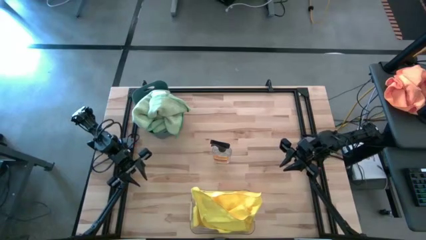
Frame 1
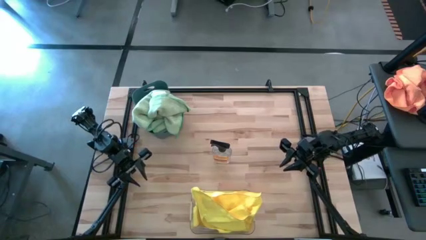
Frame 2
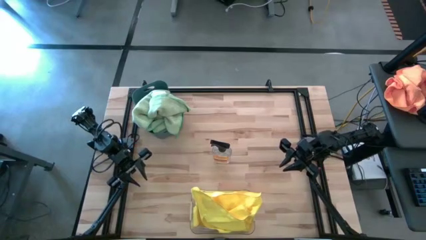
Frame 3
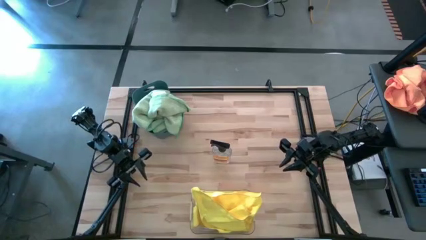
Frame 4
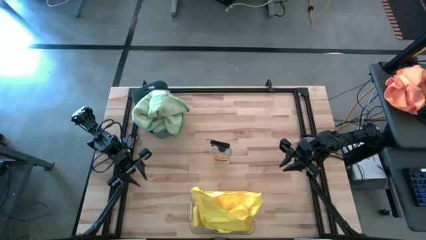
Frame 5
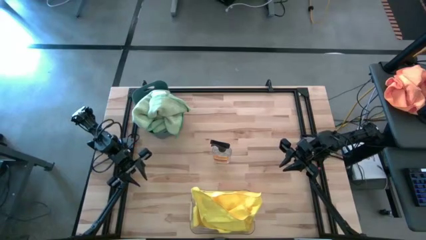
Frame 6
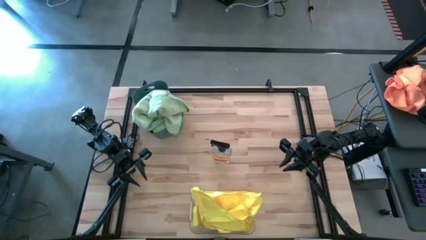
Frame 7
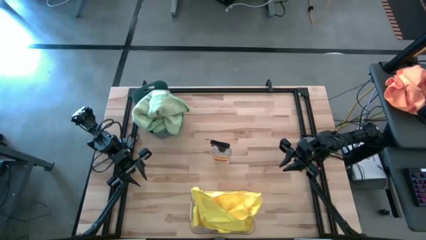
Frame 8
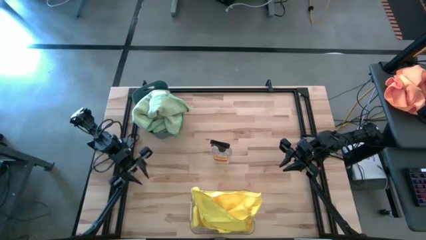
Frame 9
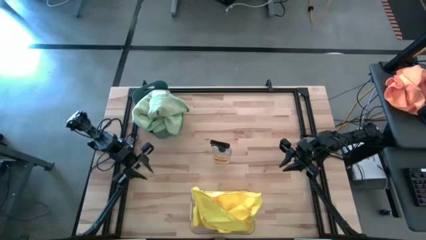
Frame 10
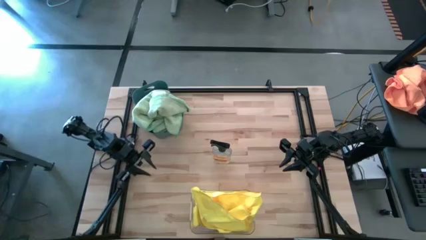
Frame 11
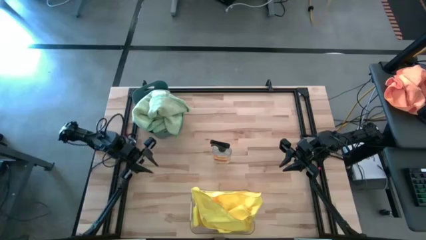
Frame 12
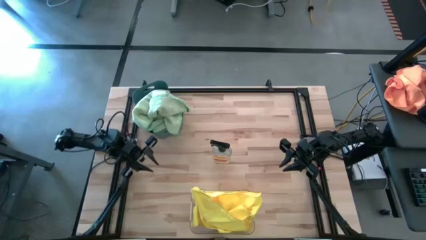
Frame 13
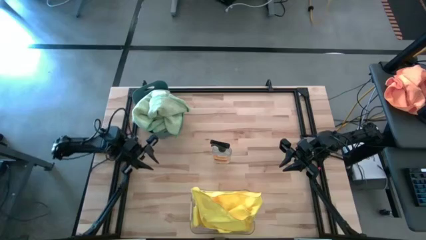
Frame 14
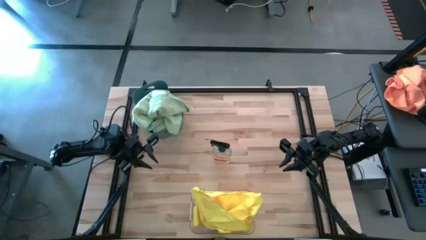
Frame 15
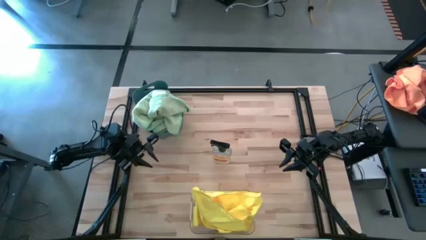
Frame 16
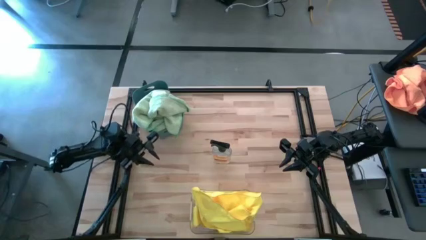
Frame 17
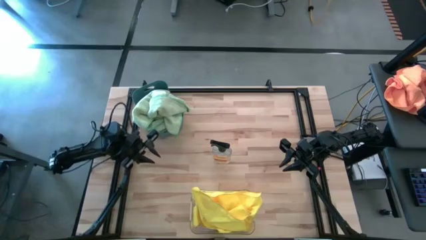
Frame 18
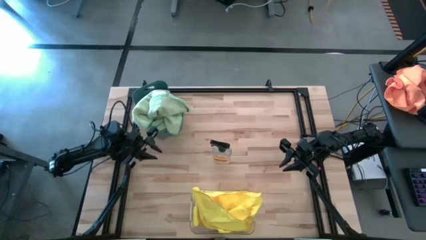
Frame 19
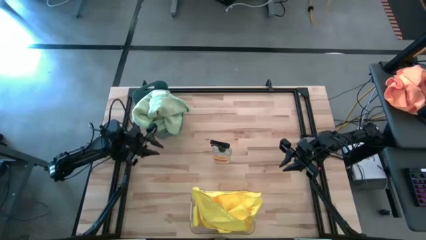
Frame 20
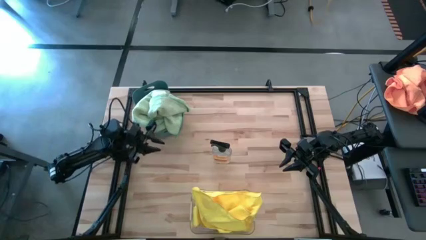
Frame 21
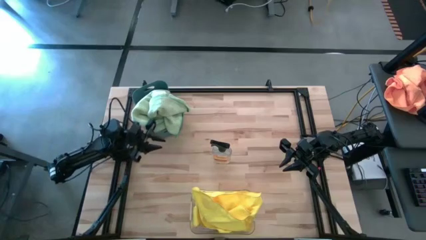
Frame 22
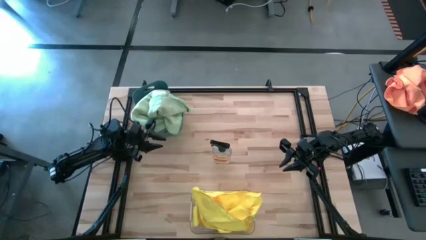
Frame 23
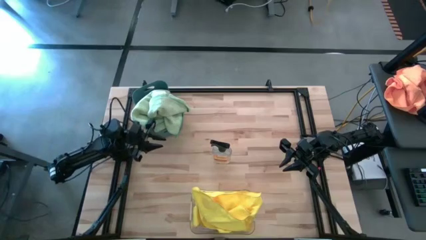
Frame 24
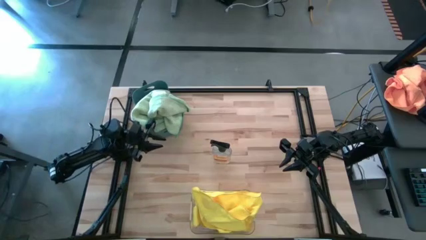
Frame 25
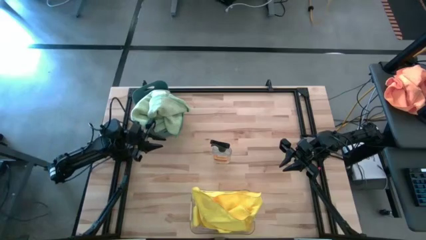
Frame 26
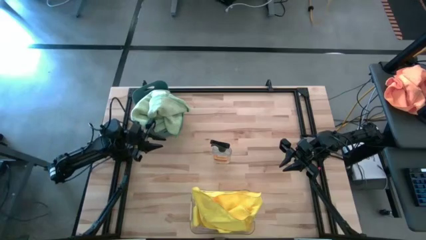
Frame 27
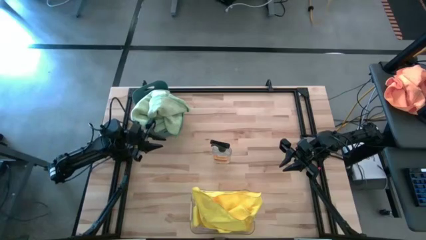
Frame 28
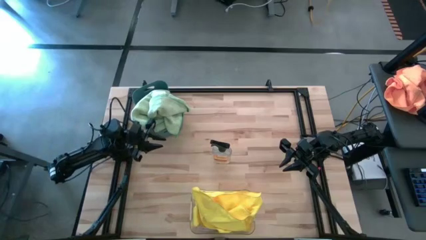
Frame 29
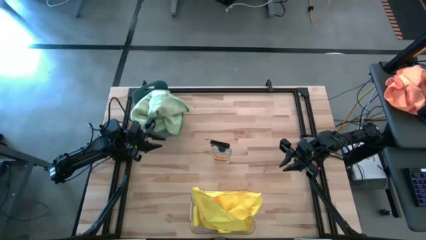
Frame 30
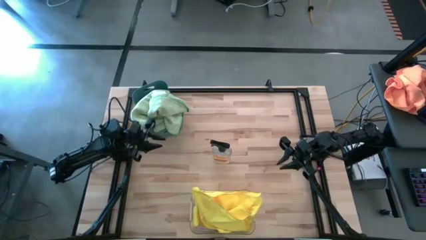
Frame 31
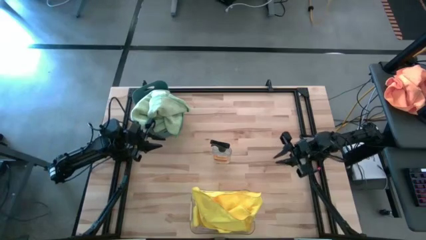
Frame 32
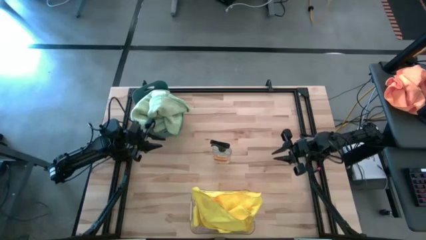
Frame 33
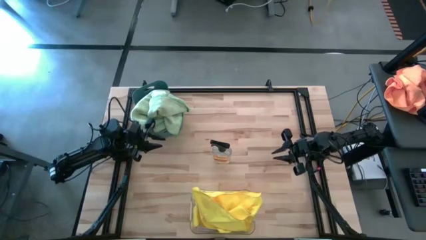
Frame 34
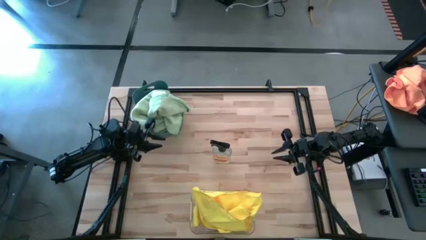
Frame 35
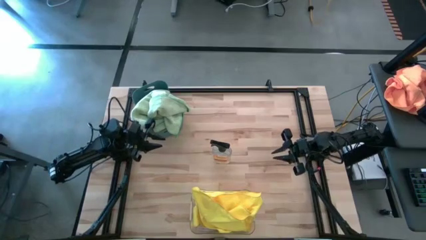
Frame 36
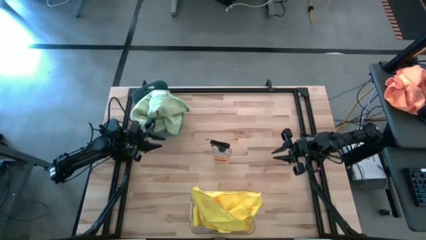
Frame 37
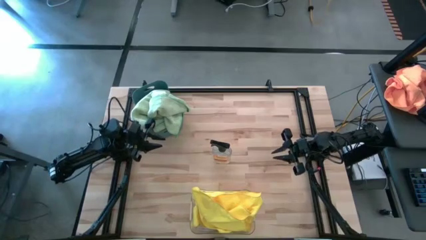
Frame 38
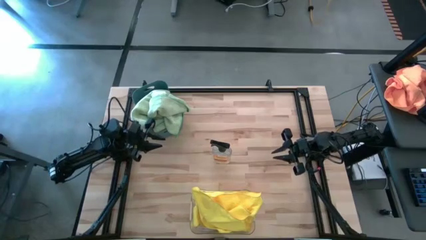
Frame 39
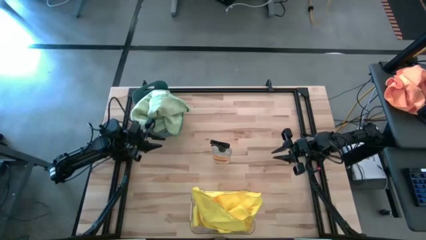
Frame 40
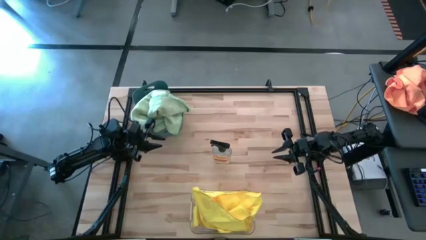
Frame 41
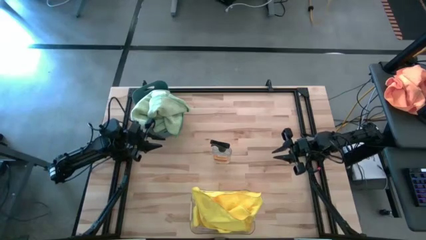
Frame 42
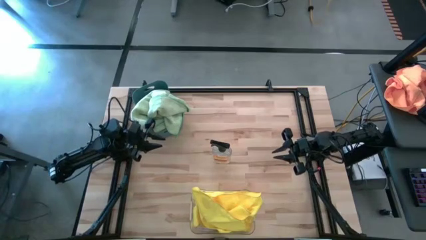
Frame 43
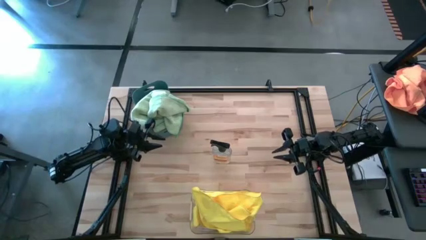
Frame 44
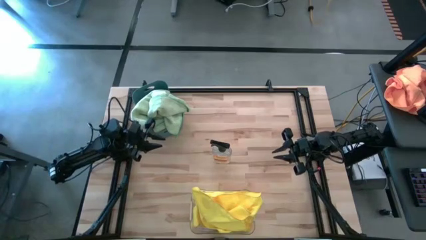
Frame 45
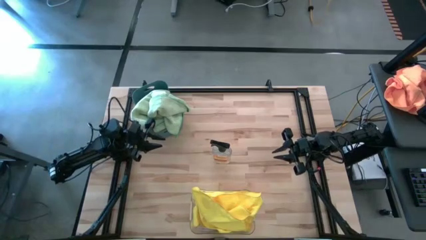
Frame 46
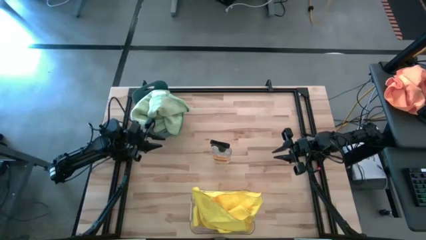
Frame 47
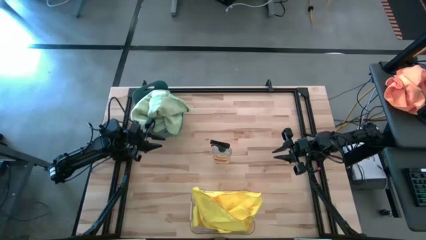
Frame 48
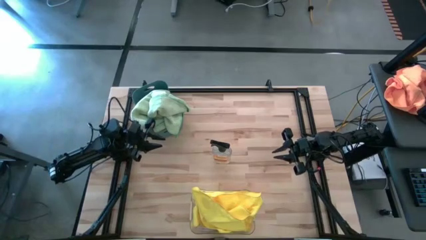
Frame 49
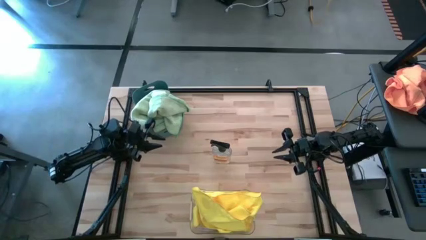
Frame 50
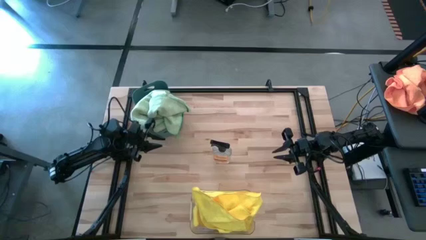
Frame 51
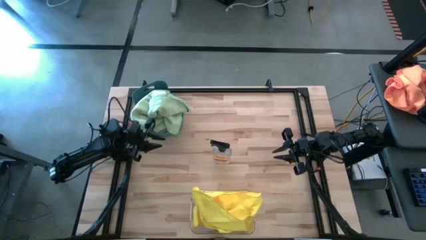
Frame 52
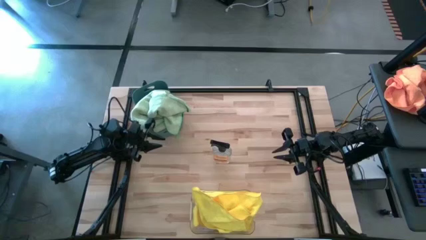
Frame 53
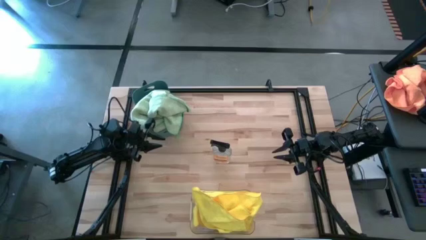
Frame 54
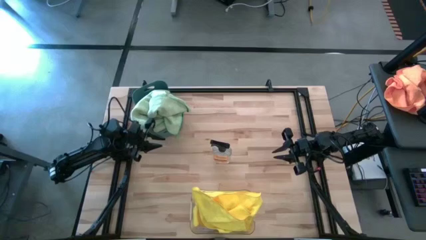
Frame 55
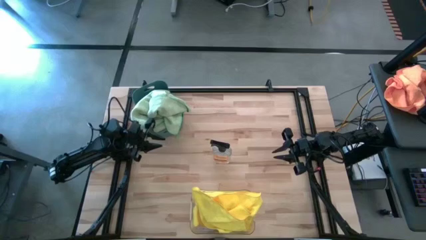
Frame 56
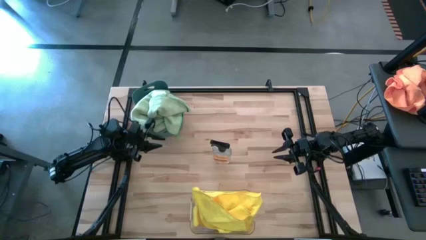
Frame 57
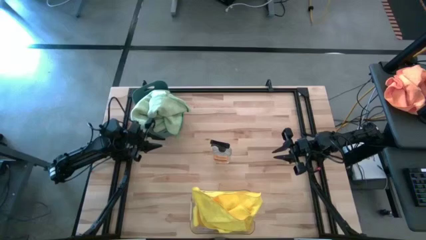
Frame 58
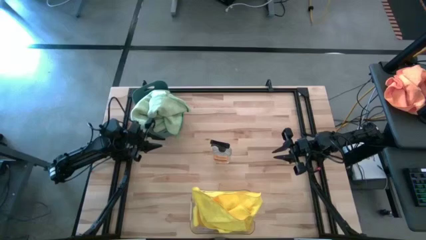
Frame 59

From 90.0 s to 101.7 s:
Task: Sort microfiber towel by color & place in baskets
Return to Home Position
